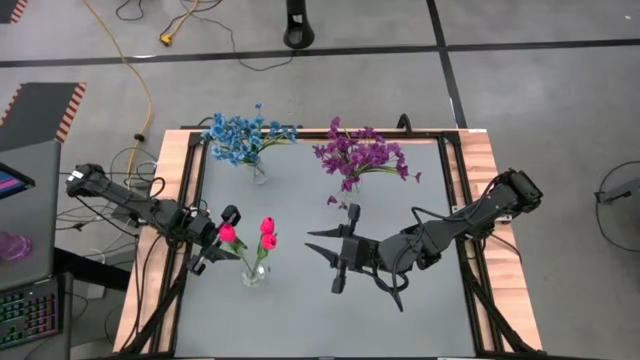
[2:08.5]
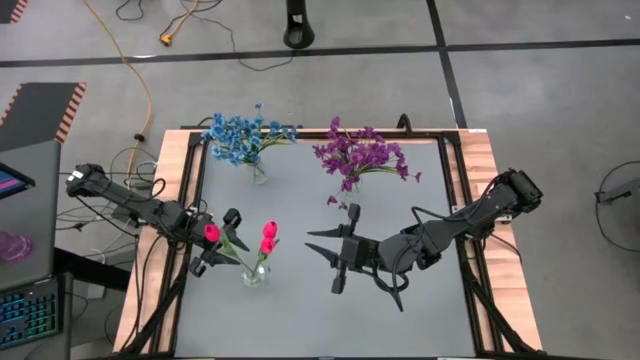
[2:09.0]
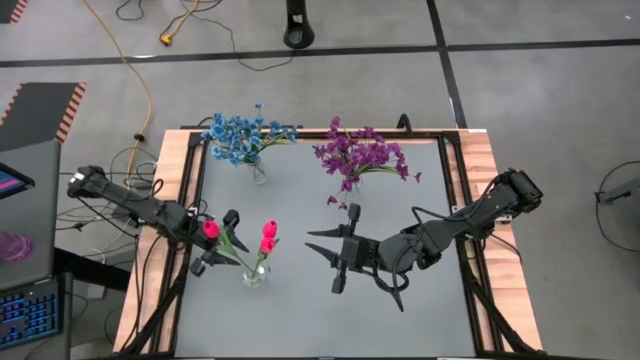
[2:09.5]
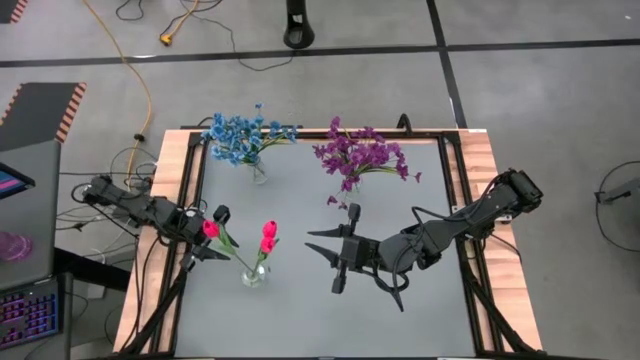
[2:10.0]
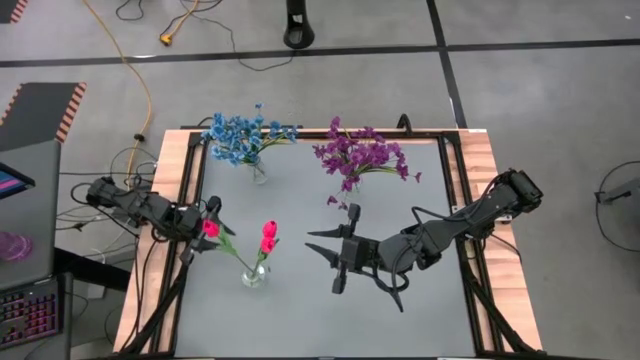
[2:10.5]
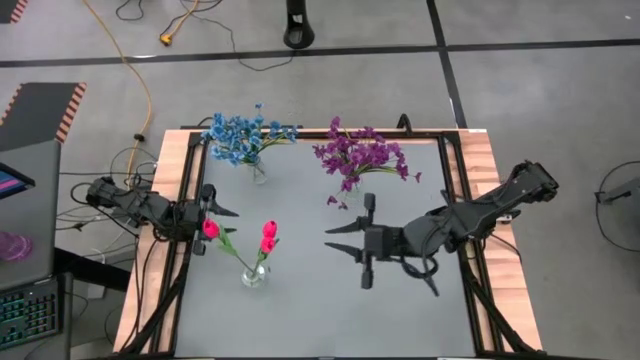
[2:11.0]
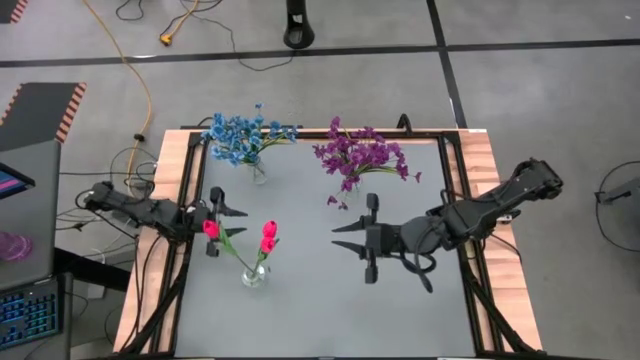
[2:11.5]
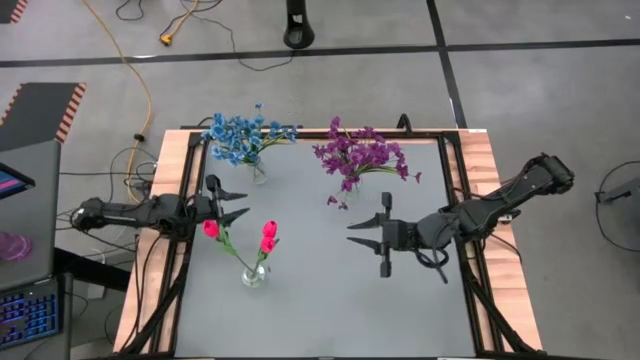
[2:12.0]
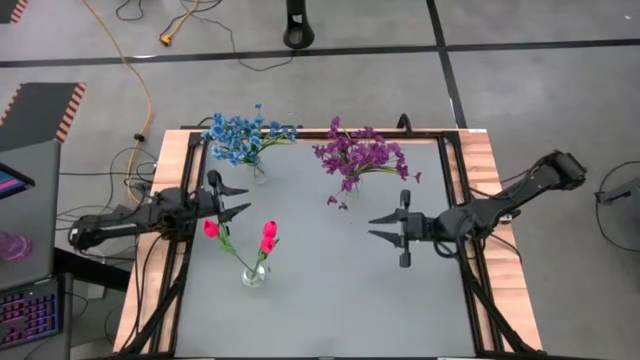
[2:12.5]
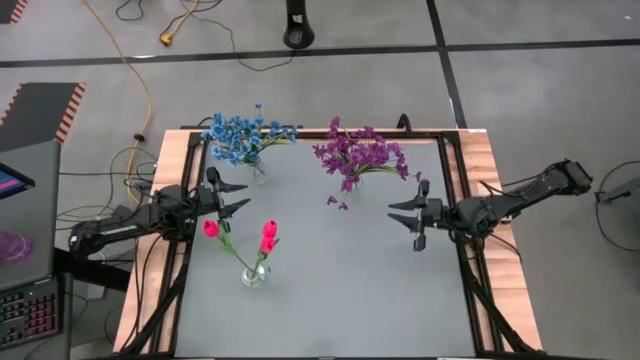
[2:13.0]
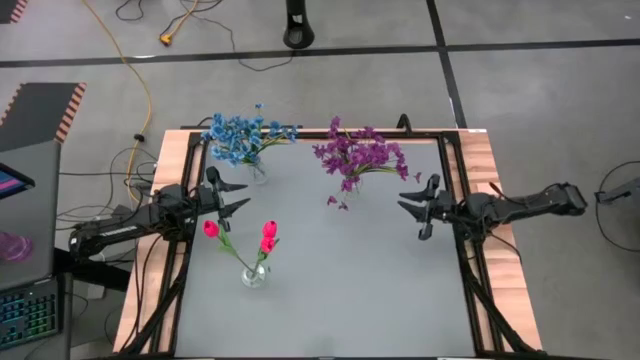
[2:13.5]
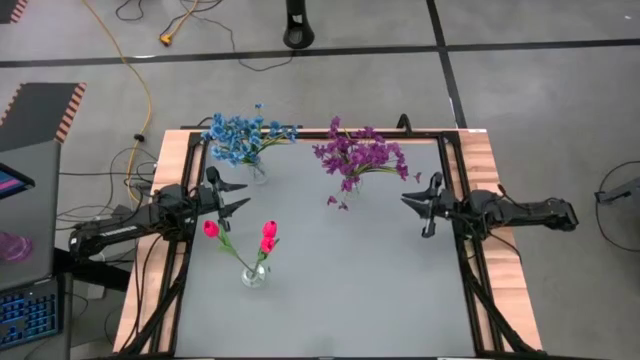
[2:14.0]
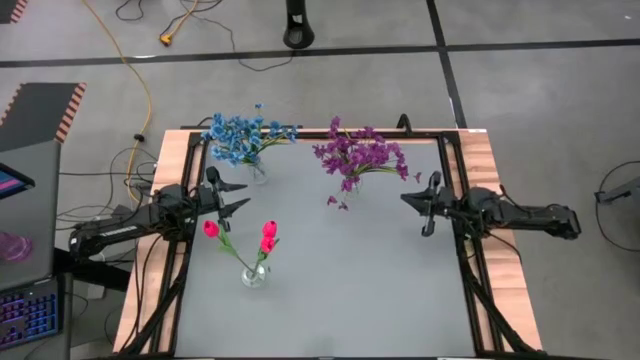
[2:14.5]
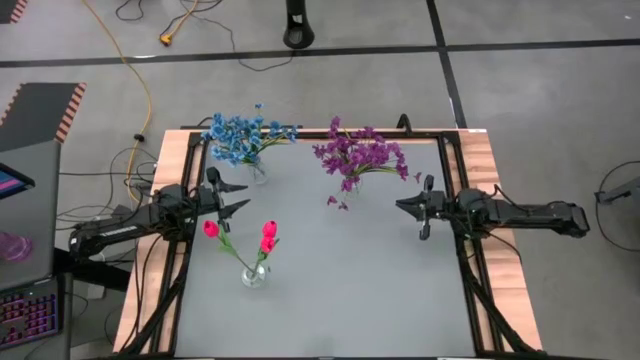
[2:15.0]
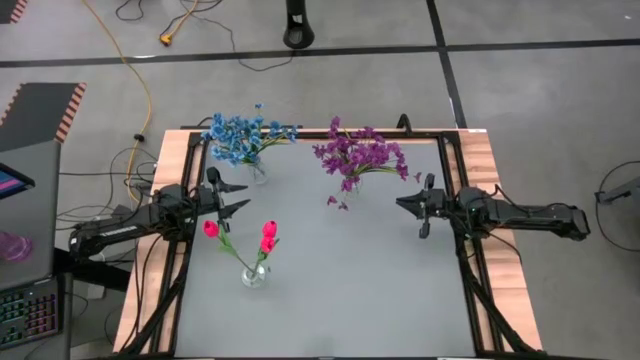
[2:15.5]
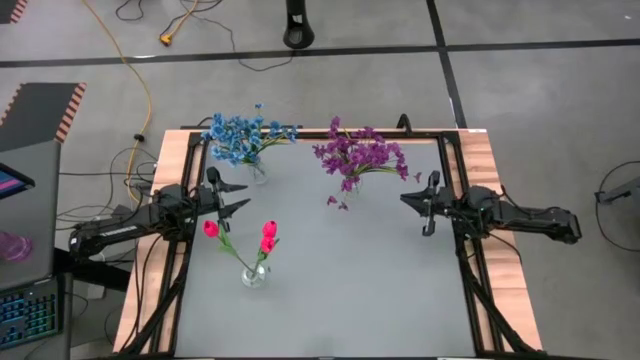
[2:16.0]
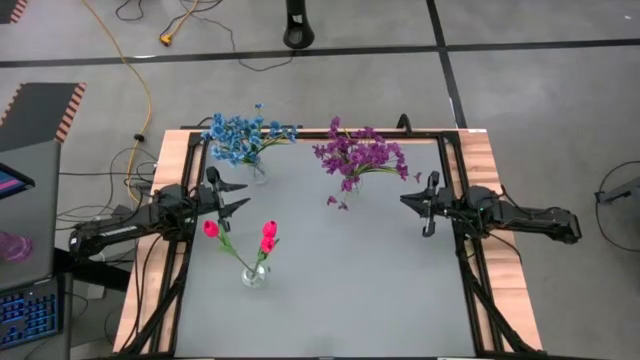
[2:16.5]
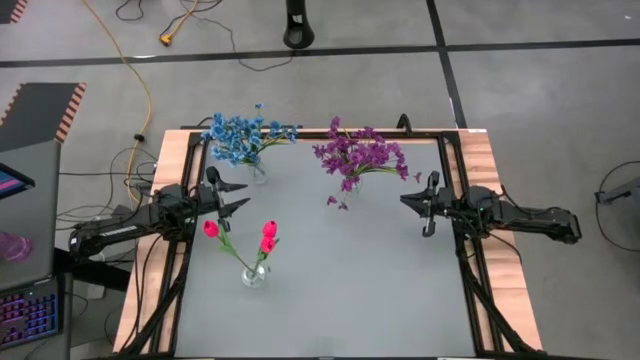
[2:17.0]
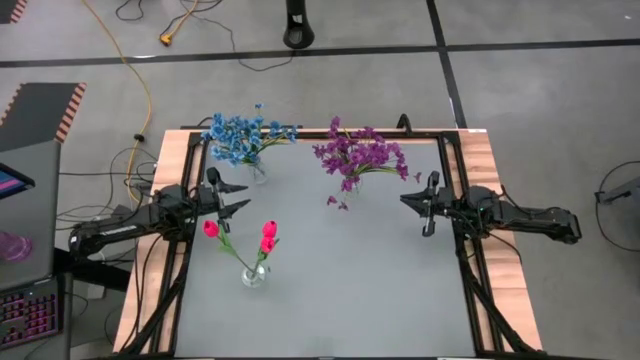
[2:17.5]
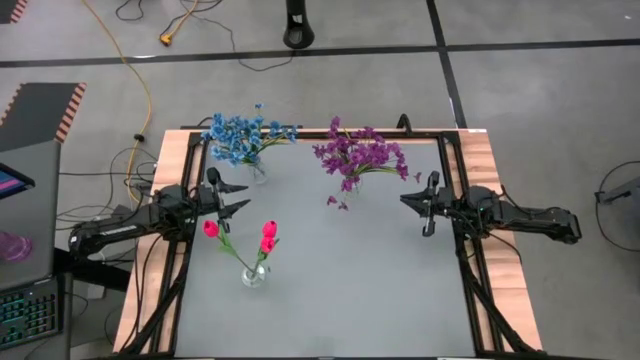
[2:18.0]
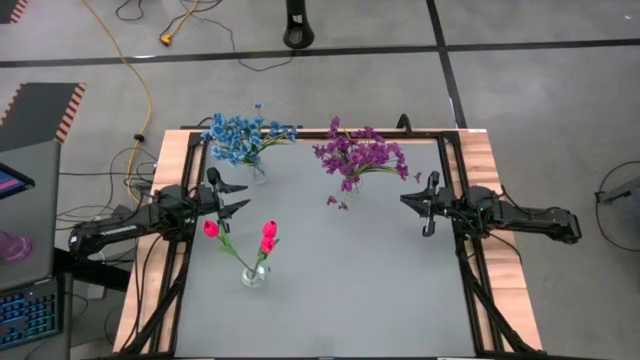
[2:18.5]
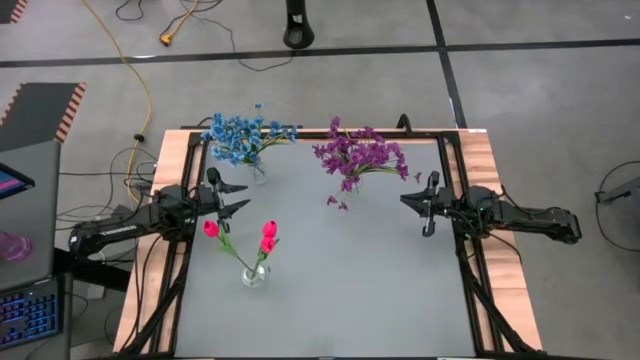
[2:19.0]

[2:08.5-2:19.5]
Task: Sort flowers into vase by color
Return to Home Position

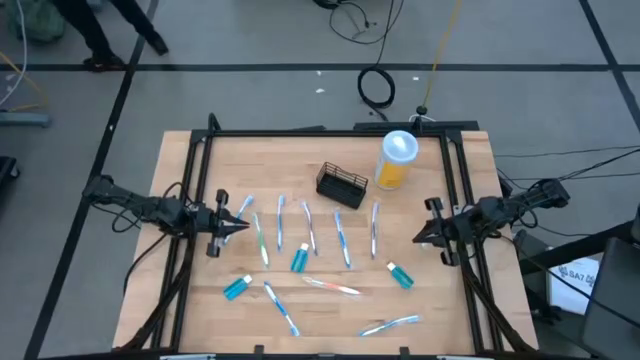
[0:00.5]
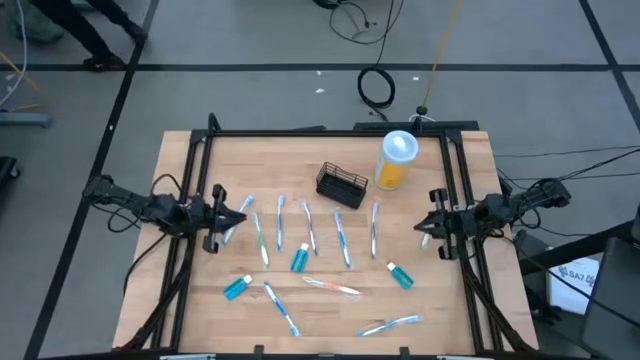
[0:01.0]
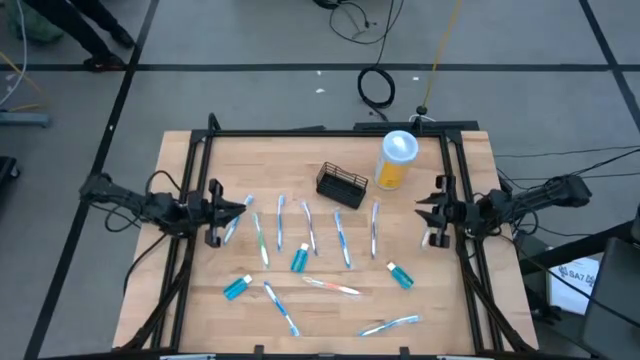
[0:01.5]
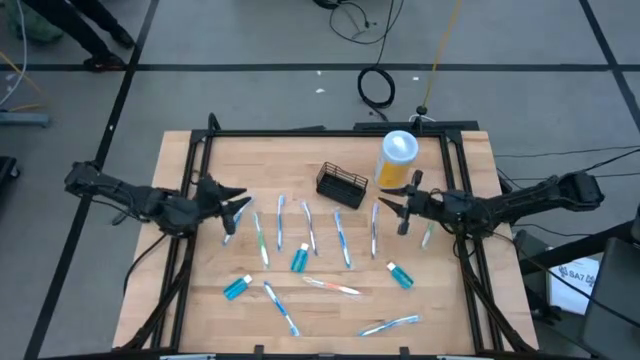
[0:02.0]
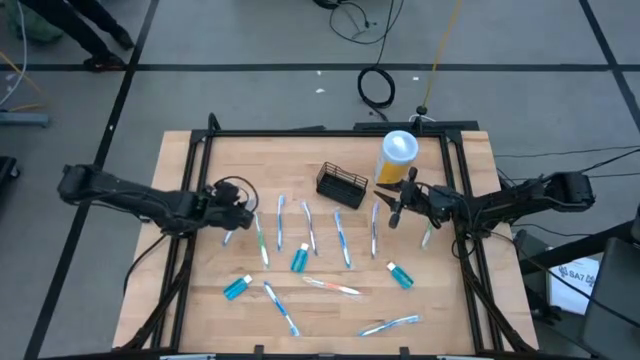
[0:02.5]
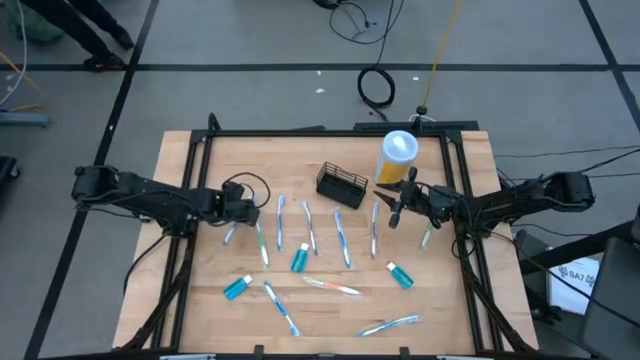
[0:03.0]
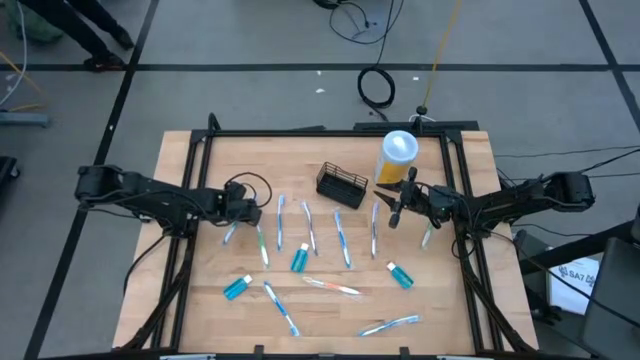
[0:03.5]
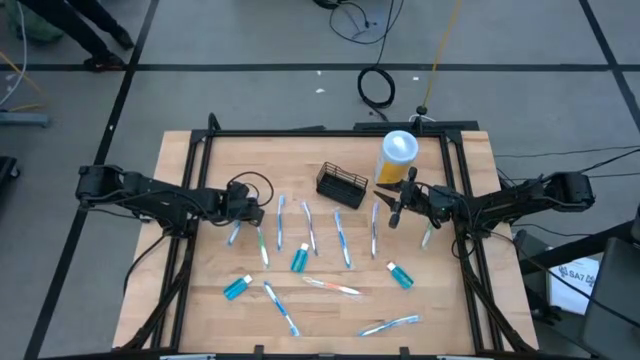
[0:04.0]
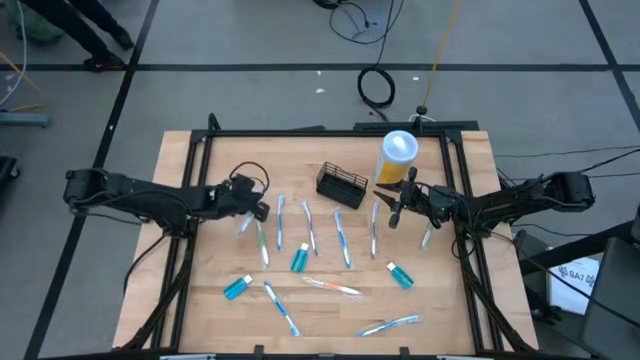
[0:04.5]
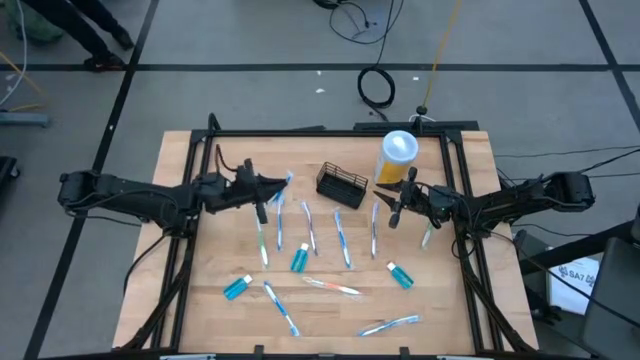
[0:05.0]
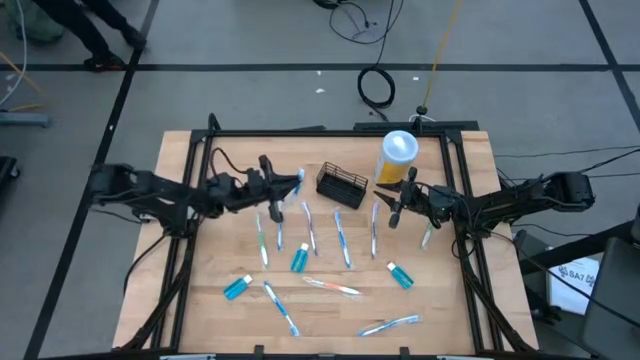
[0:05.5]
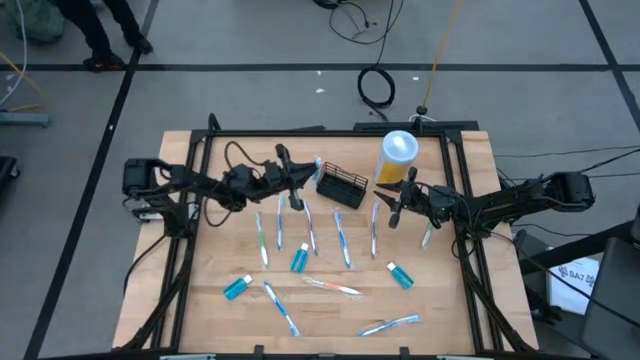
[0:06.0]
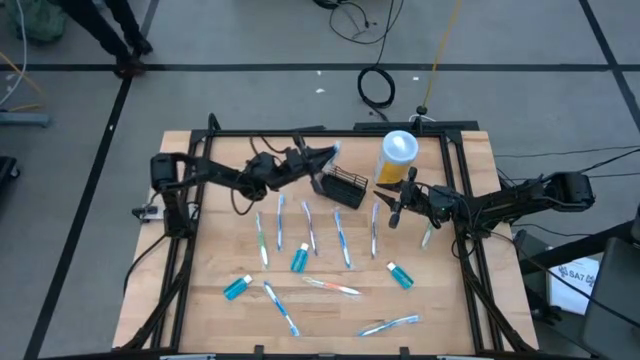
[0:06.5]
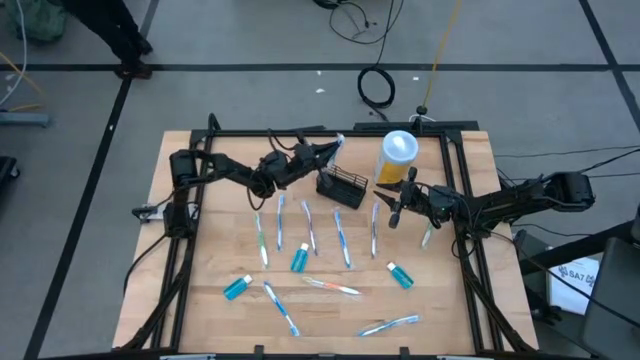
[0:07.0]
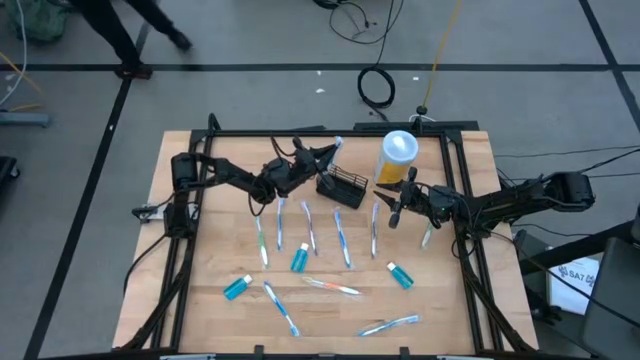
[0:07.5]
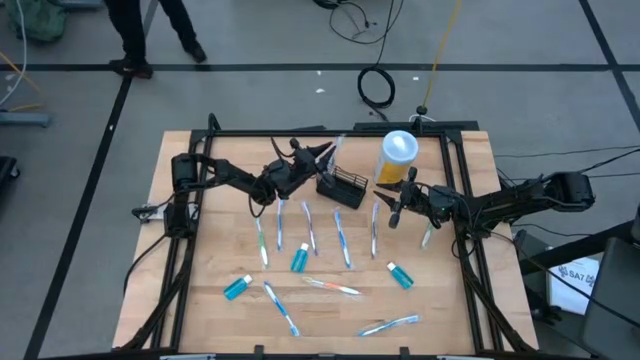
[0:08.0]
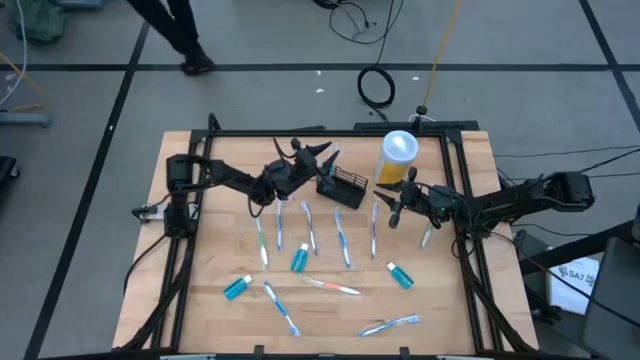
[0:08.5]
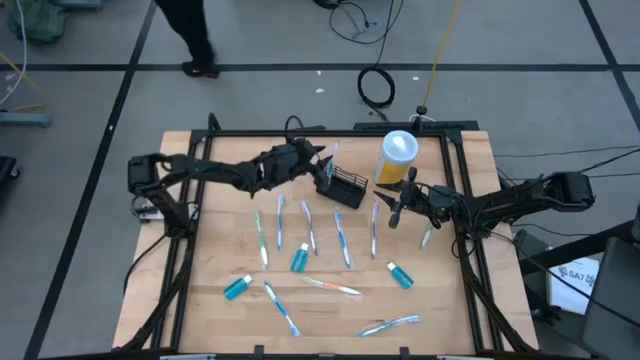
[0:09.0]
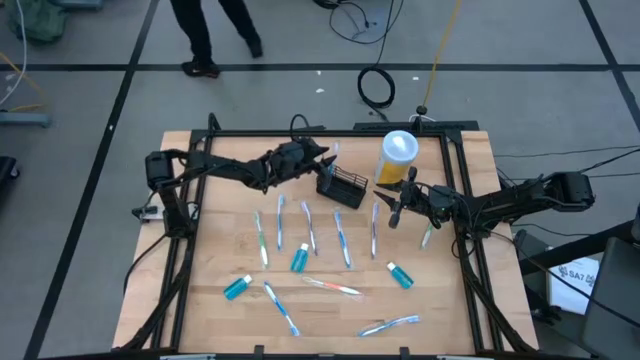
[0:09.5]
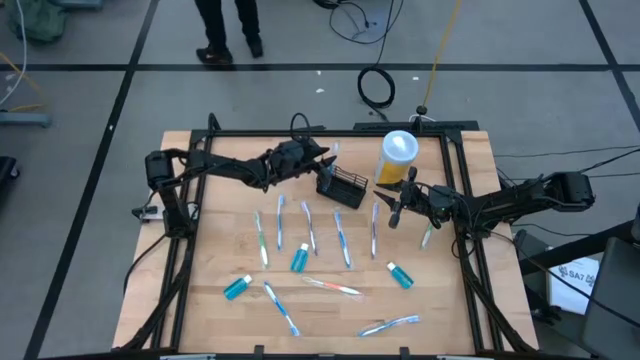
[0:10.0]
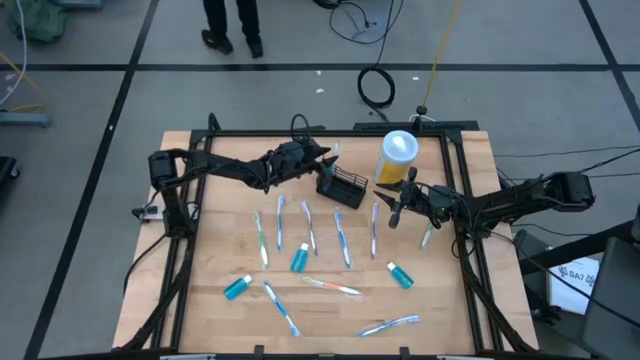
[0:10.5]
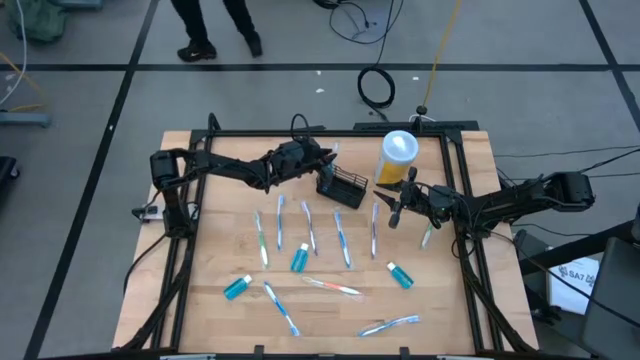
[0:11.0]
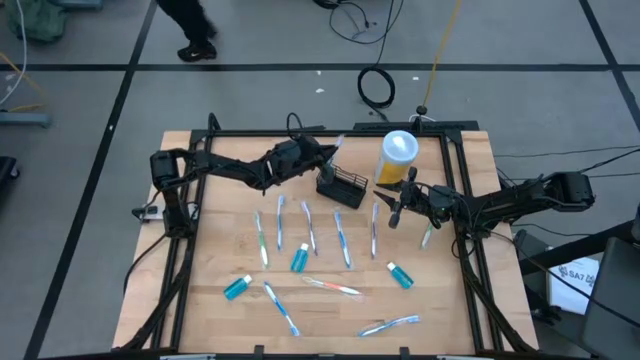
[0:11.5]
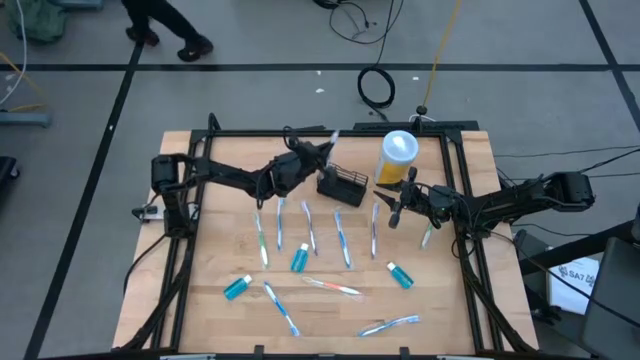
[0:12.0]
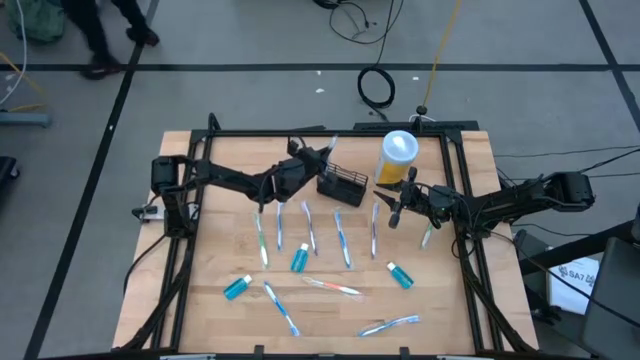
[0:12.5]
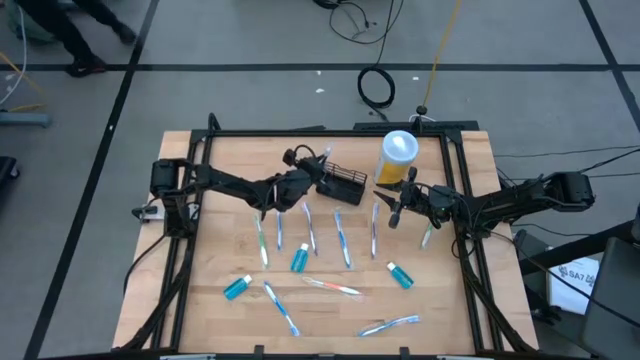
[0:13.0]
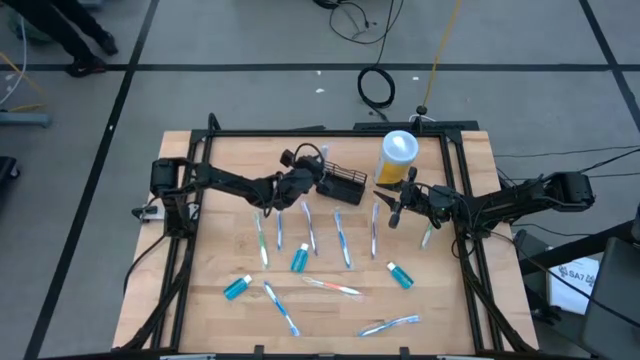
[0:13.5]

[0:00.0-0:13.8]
Task: Pick & Place toothbrushing station
Put the blue toothbrush into the black organizer
